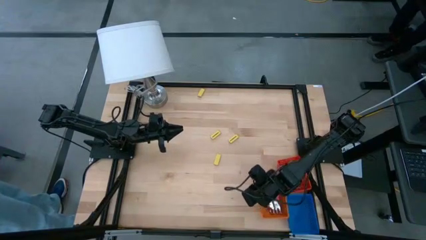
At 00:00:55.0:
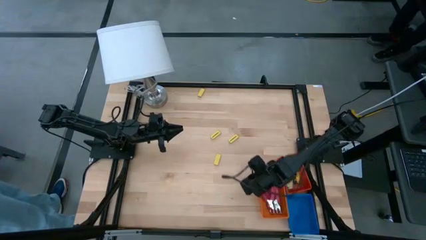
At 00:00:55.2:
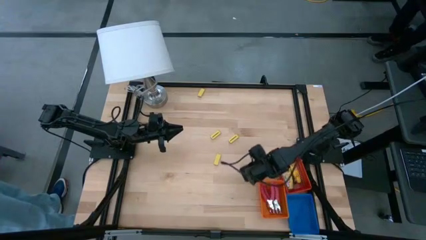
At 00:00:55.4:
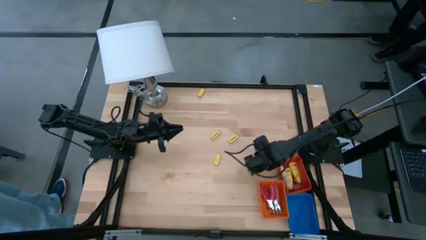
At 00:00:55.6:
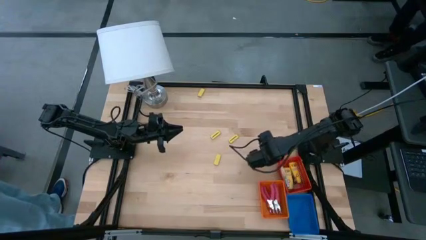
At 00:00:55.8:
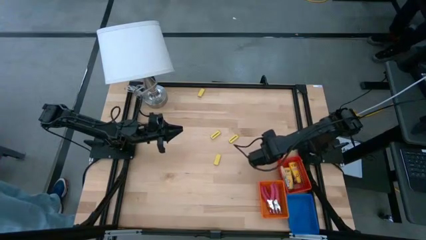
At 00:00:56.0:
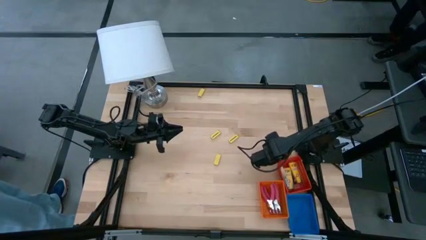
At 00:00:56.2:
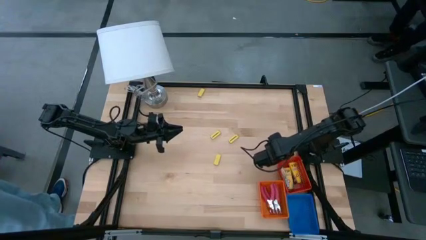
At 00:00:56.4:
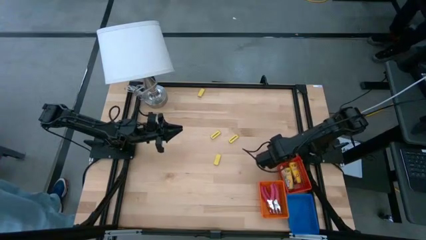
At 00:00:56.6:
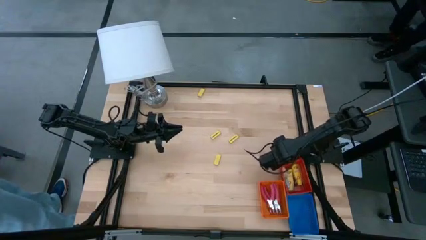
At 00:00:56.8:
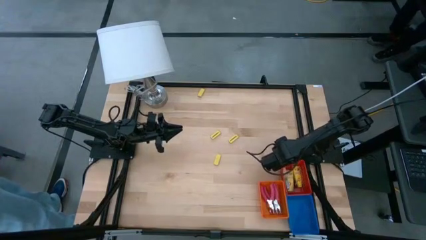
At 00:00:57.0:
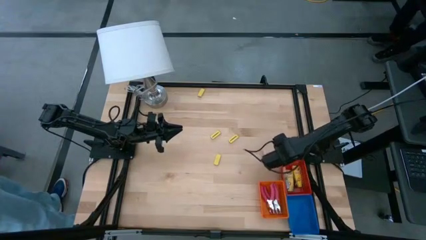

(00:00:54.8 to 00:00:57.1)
Task: Pick & Place School Supplies
Adjust the red basket

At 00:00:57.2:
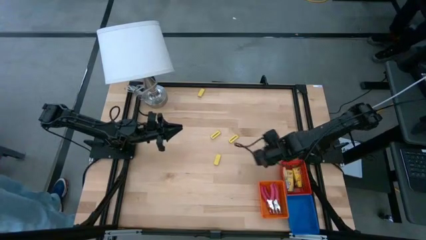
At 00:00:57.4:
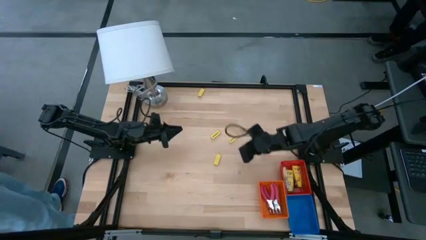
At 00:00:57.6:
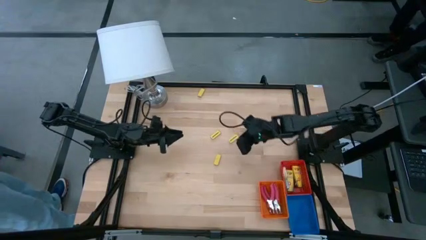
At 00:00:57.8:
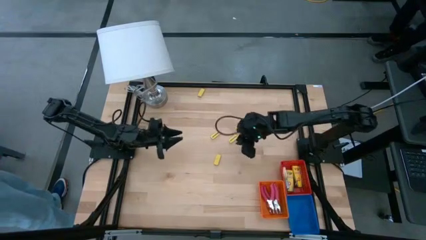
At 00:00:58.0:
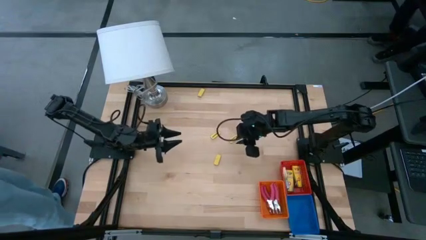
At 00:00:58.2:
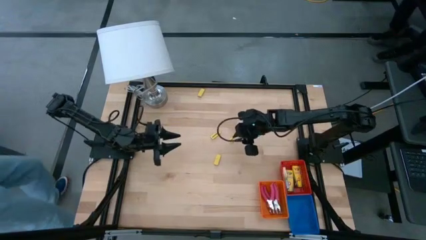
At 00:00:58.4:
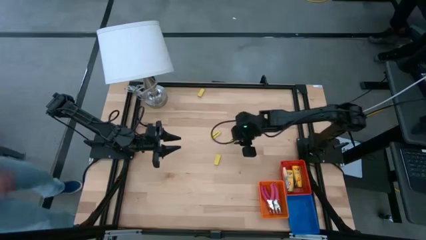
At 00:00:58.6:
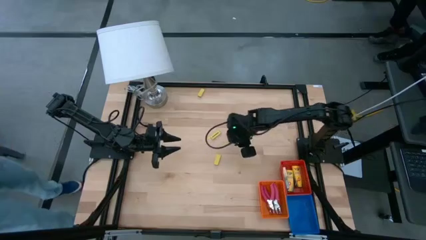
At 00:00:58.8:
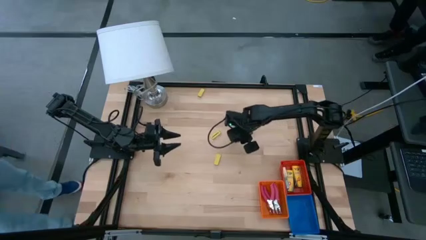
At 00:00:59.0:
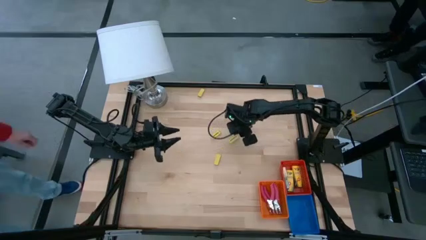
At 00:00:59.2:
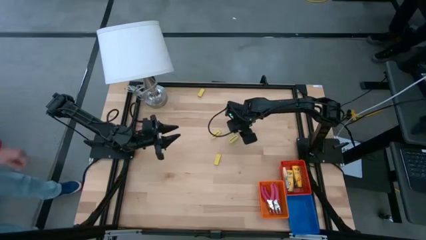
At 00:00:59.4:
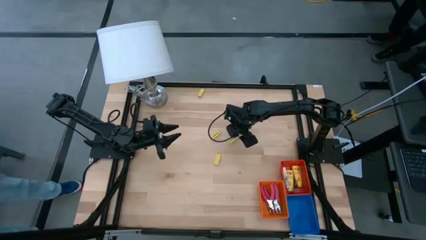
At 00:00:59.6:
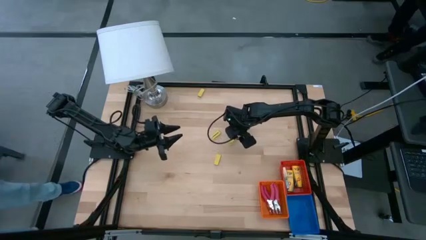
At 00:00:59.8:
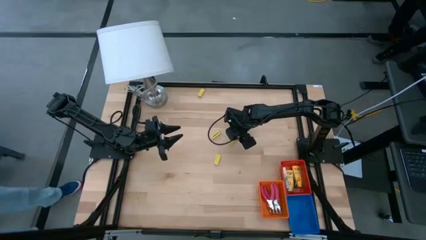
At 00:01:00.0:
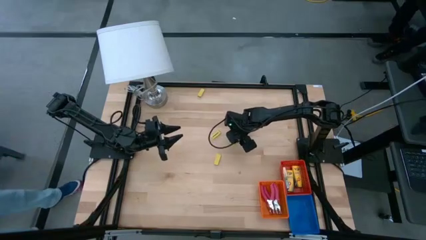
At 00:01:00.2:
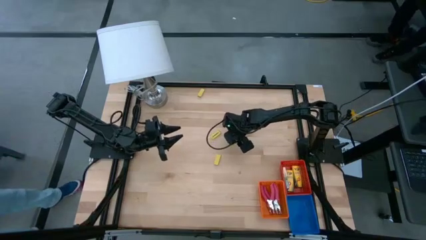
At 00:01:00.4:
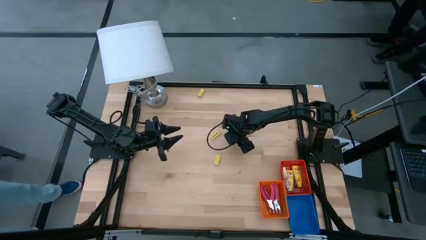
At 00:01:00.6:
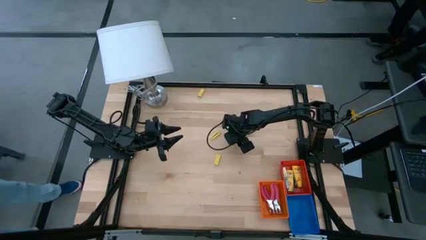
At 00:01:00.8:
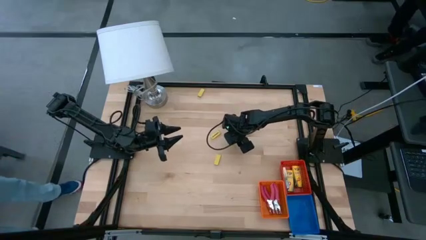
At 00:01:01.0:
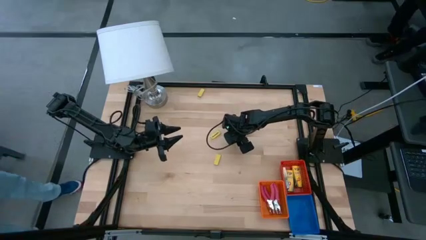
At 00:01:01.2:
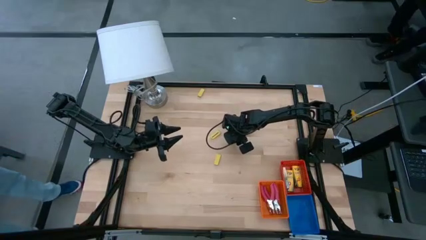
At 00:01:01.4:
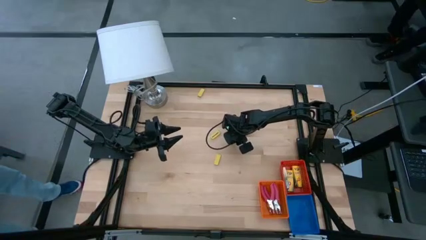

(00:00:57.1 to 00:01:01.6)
Put the yellow eraser into the blue basket

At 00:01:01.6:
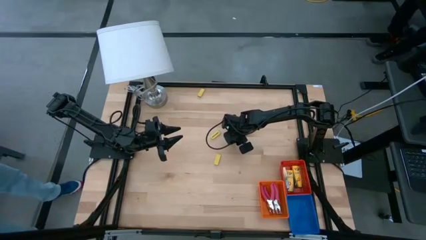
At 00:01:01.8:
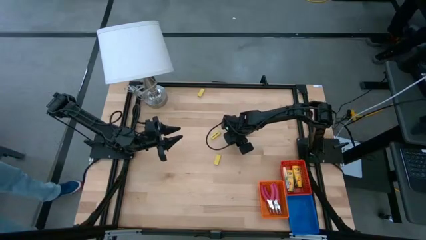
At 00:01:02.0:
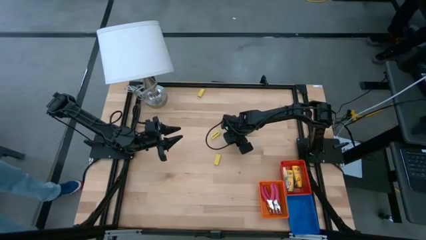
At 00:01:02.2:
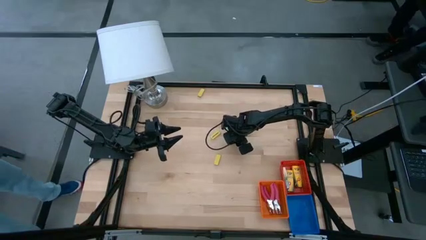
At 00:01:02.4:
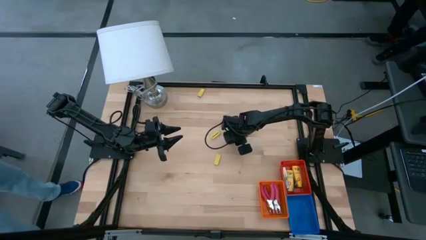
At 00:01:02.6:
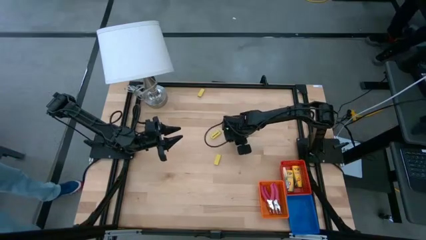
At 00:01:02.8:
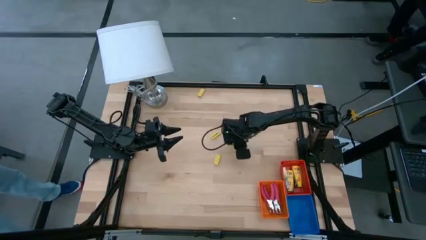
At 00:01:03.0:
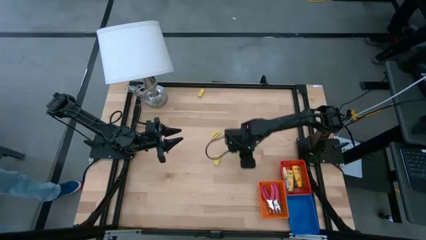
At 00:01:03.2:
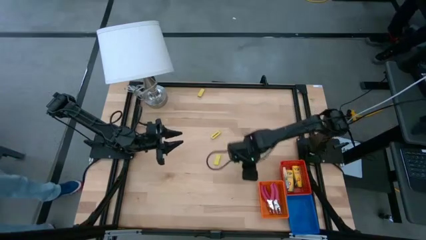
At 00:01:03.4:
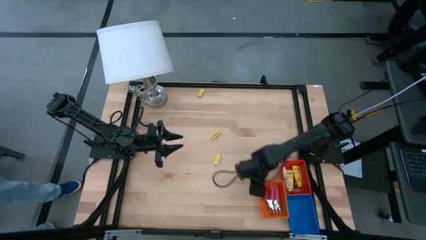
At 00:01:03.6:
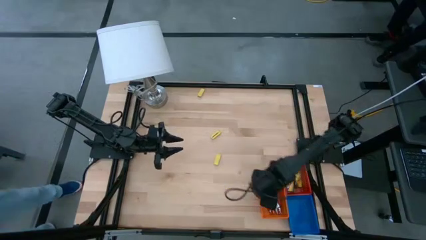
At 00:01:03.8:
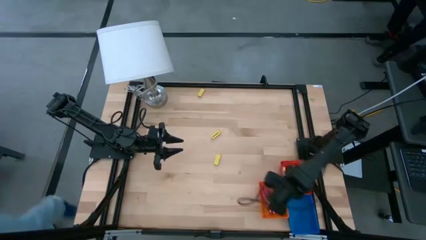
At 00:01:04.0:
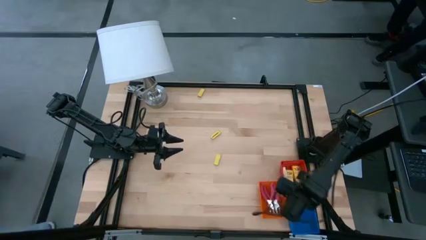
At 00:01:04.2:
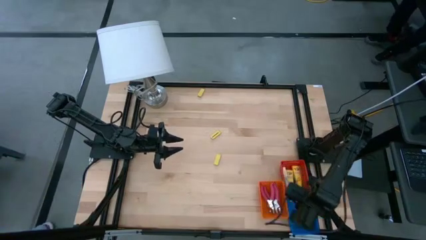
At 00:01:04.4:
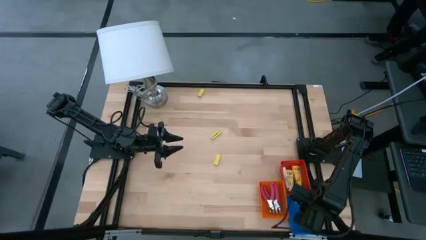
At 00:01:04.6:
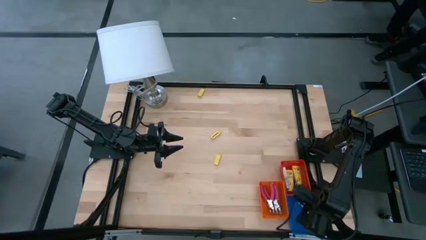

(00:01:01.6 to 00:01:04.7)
Put the yellow eraser into the blue basket

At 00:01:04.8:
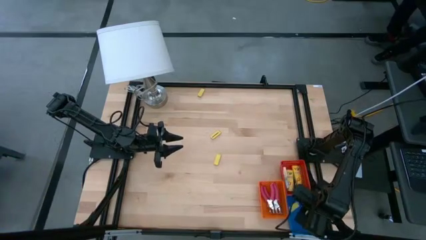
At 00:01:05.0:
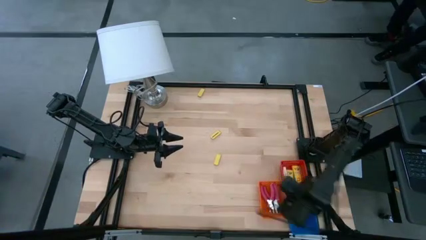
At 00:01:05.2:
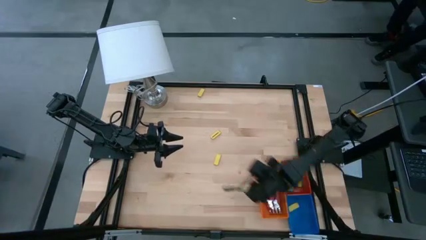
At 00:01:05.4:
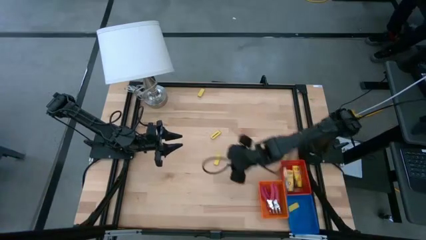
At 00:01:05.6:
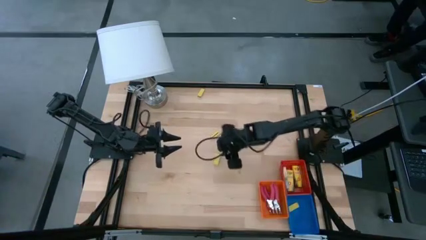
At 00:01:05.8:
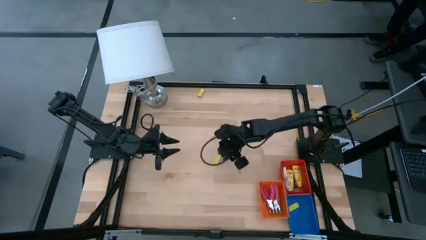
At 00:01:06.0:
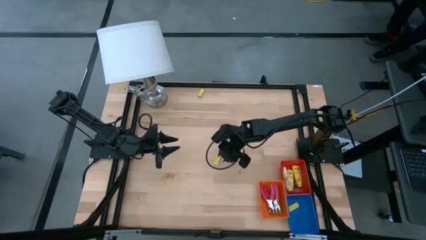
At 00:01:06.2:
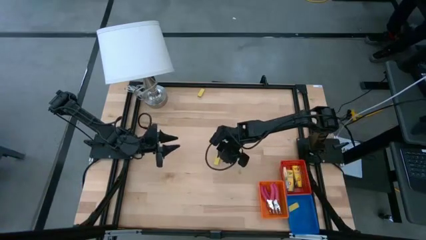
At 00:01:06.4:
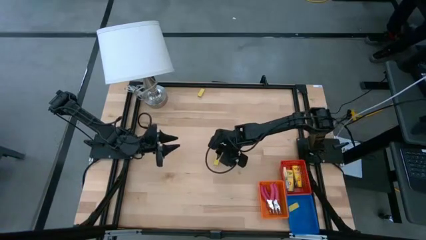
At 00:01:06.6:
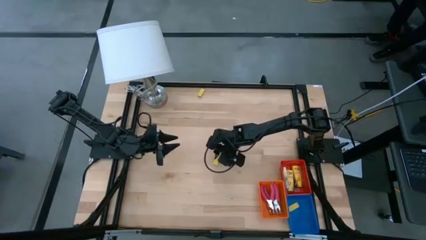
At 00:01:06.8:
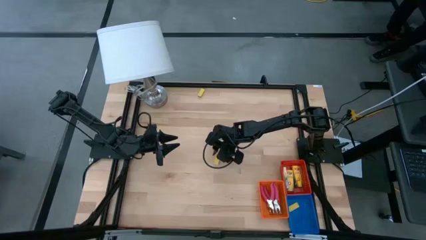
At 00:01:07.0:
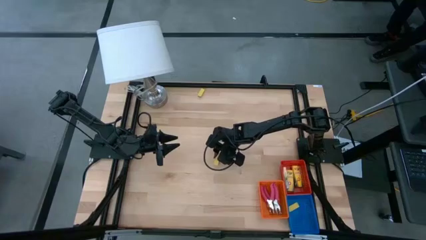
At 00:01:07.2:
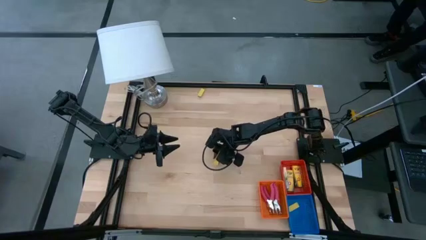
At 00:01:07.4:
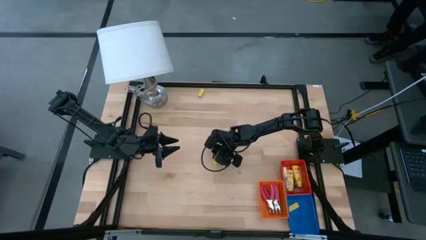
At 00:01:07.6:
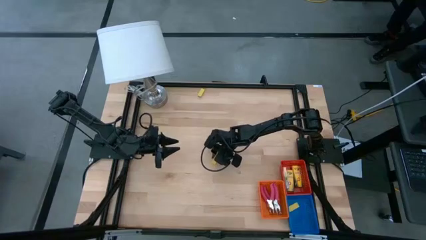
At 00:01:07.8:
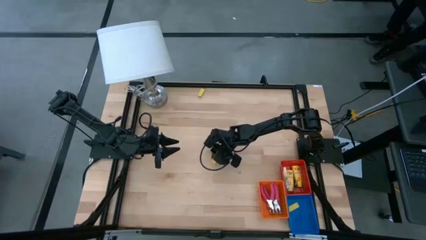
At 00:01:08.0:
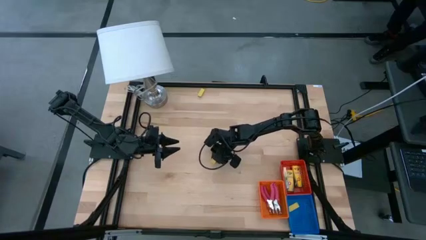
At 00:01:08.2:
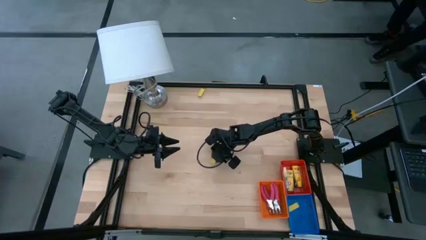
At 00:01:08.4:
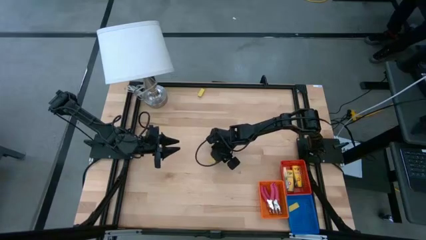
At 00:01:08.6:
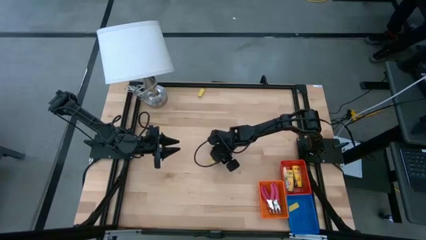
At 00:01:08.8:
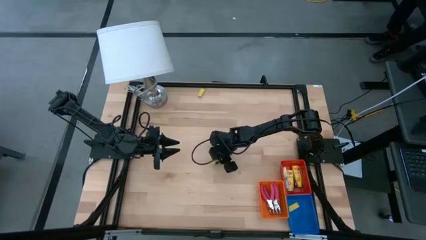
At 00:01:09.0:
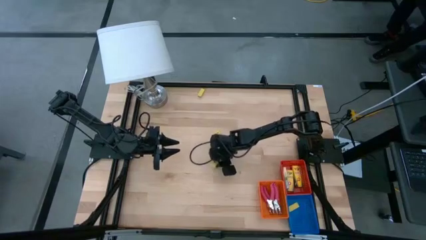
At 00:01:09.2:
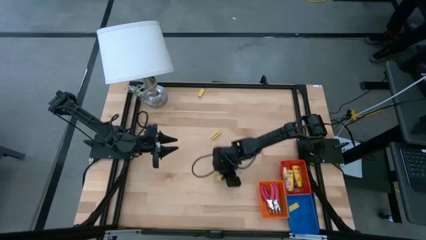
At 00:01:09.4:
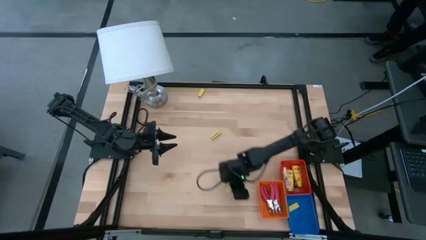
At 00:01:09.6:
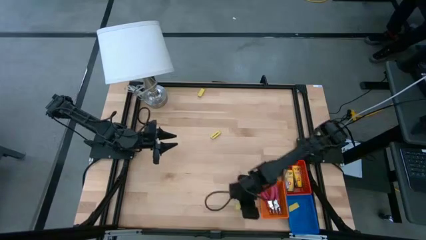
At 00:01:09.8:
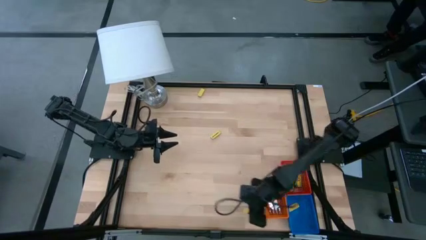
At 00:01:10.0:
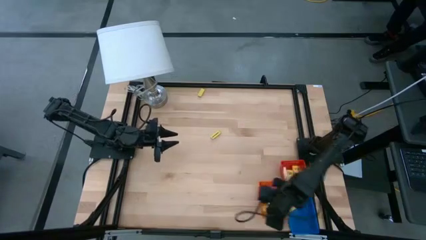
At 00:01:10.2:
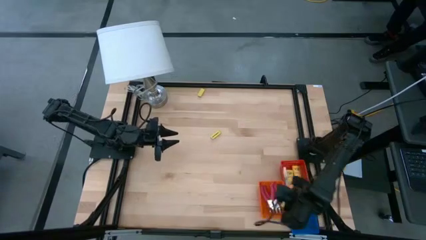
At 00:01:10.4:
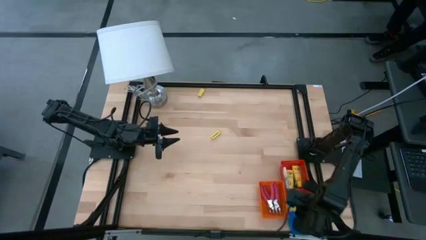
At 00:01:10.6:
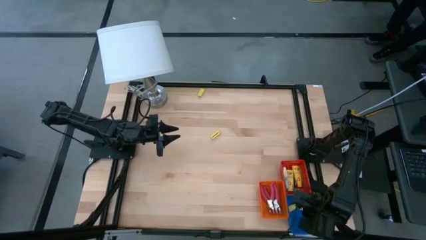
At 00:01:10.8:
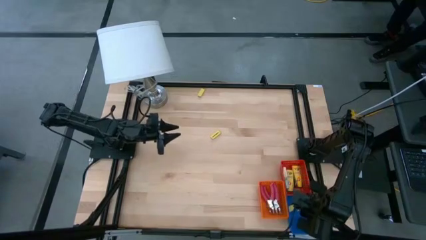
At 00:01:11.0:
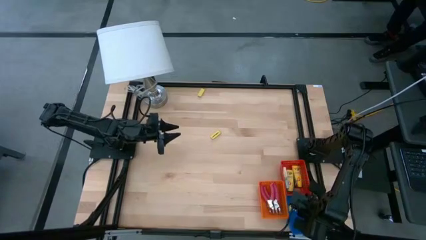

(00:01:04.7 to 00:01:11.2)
Put the yellow eraser into the blue basket

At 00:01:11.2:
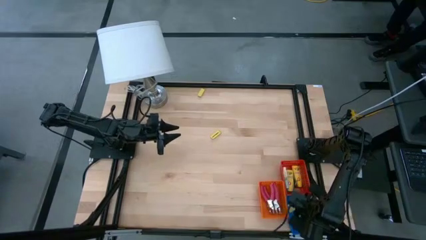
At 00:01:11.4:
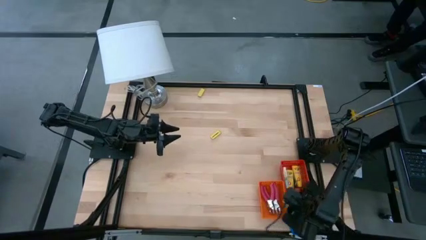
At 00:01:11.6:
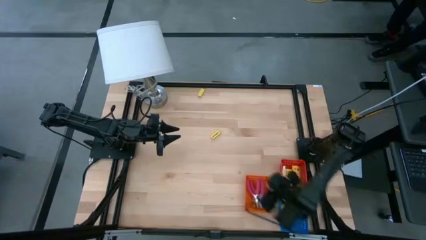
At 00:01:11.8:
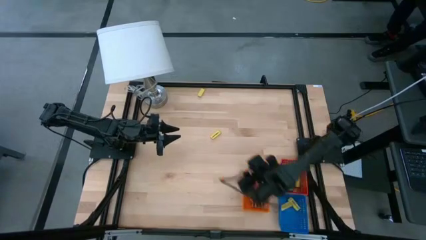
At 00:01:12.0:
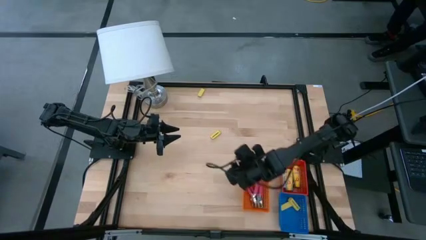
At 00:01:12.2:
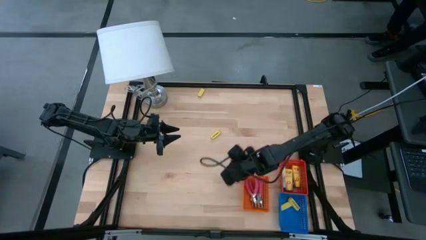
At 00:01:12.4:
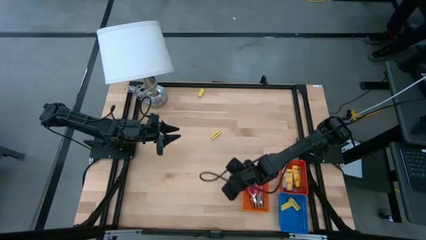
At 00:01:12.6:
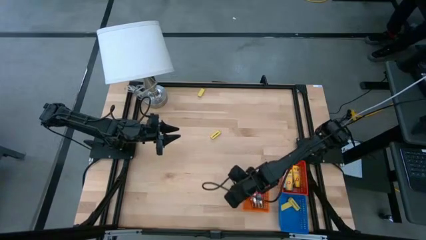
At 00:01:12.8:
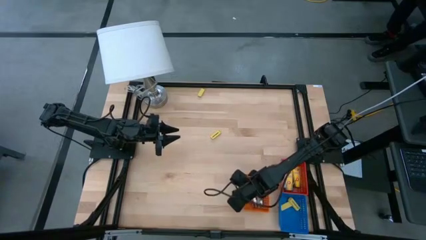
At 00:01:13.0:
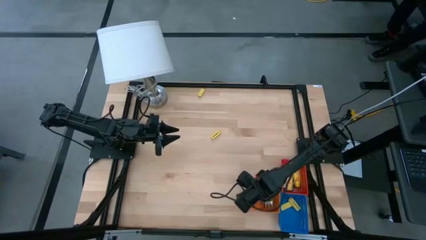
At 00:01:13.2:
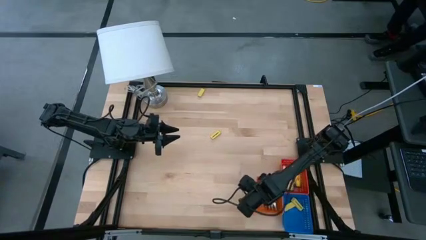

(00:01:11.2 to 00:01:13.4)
Adjust the orange basket
